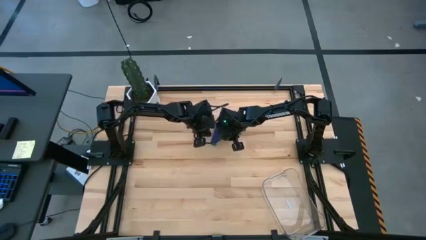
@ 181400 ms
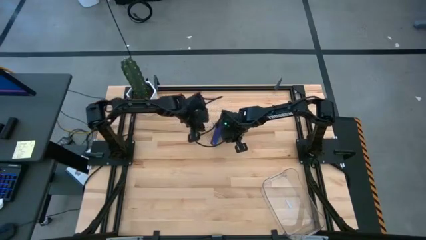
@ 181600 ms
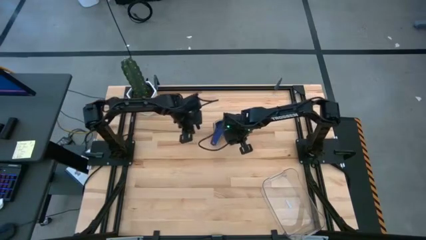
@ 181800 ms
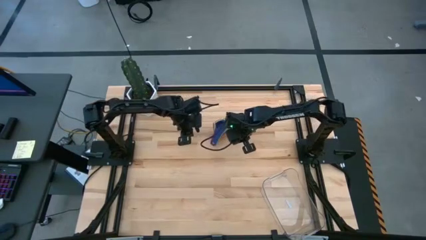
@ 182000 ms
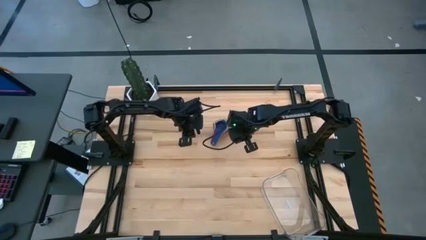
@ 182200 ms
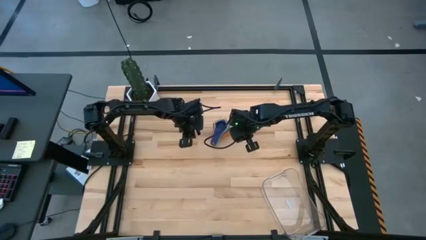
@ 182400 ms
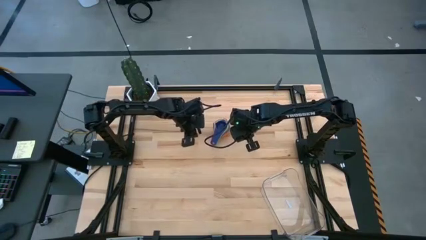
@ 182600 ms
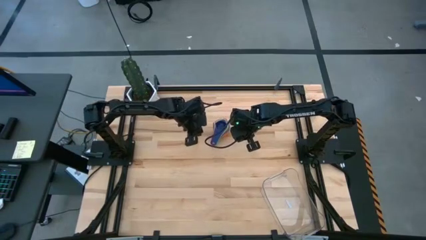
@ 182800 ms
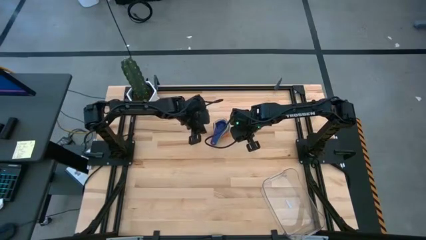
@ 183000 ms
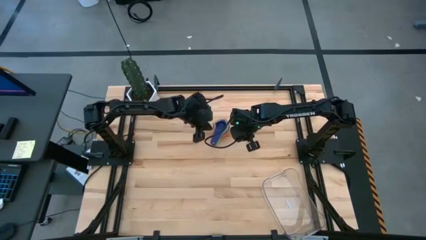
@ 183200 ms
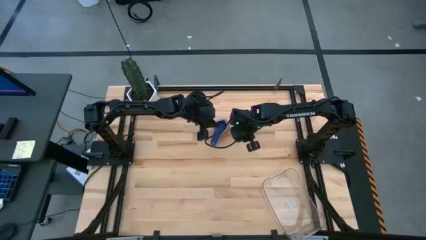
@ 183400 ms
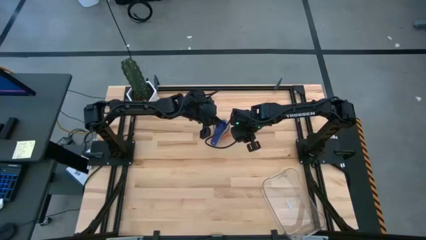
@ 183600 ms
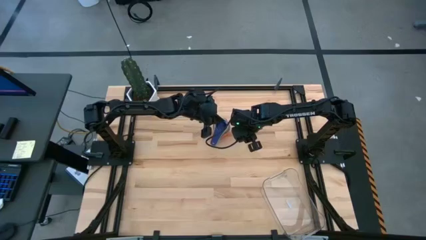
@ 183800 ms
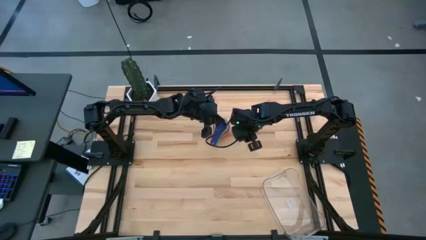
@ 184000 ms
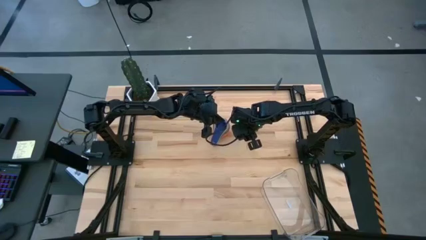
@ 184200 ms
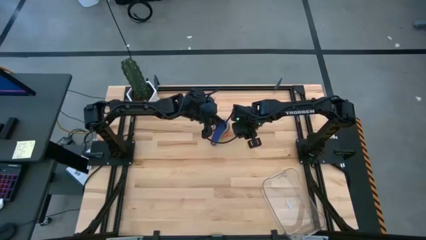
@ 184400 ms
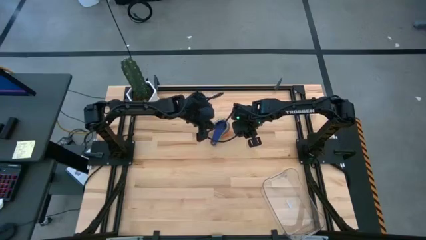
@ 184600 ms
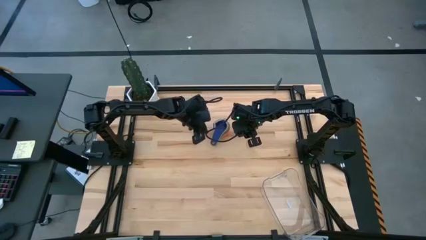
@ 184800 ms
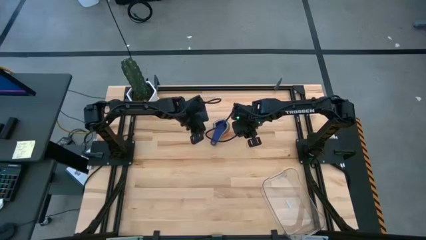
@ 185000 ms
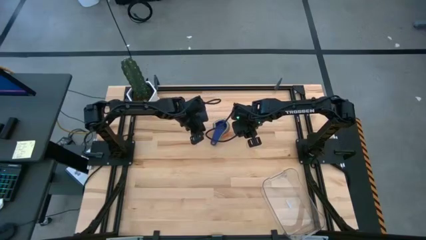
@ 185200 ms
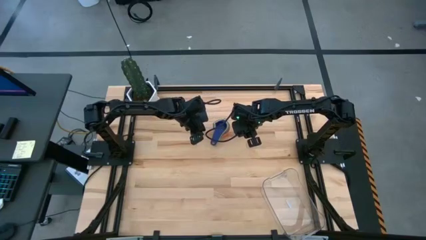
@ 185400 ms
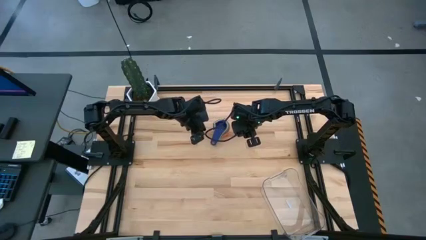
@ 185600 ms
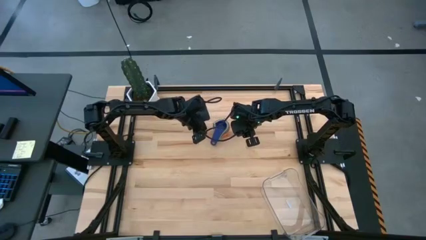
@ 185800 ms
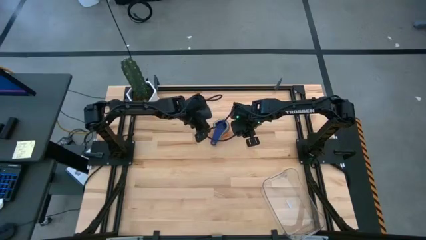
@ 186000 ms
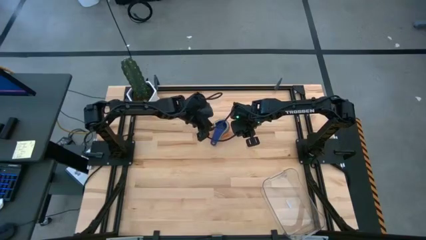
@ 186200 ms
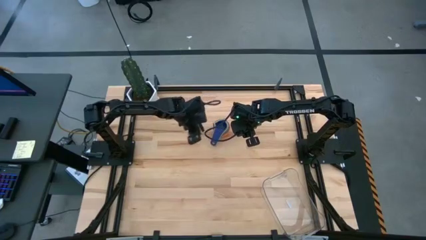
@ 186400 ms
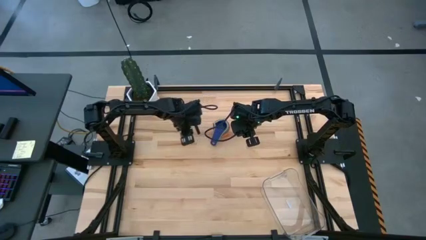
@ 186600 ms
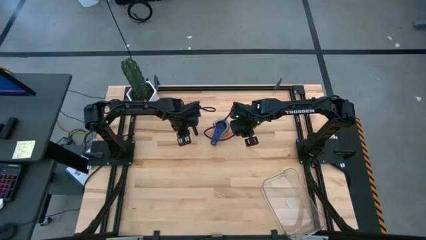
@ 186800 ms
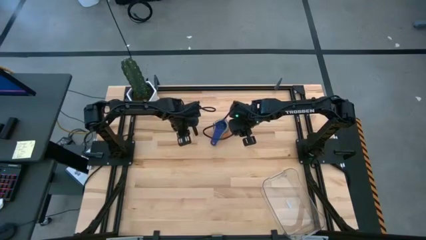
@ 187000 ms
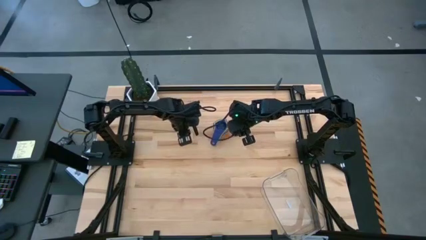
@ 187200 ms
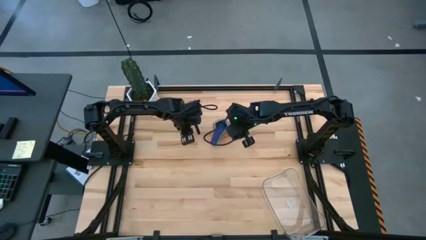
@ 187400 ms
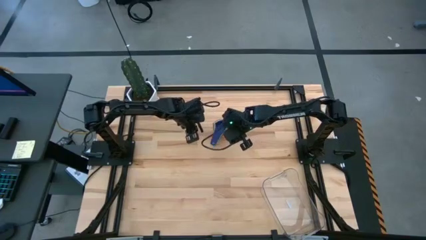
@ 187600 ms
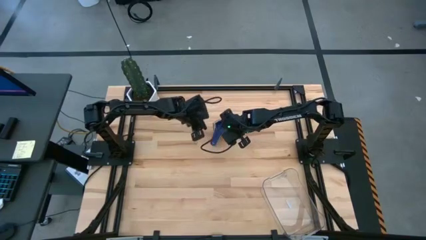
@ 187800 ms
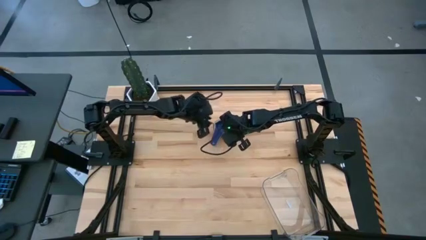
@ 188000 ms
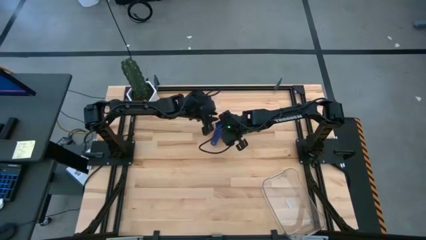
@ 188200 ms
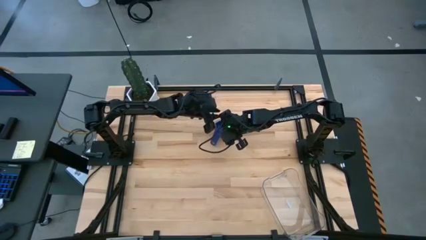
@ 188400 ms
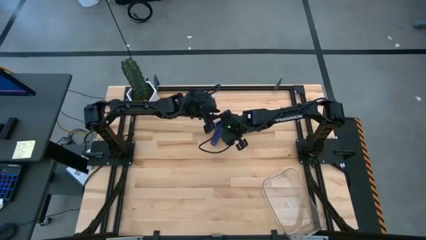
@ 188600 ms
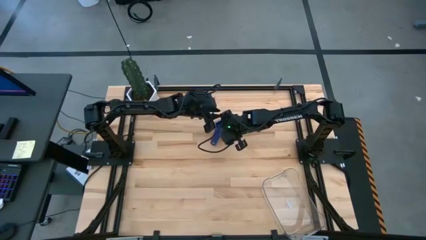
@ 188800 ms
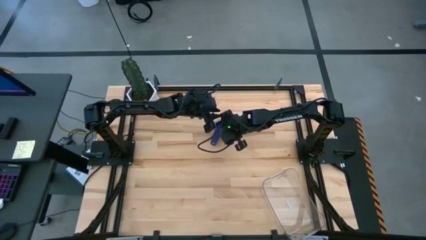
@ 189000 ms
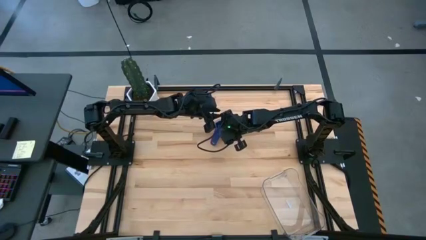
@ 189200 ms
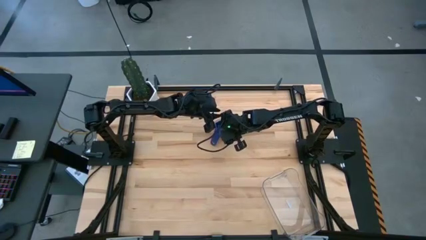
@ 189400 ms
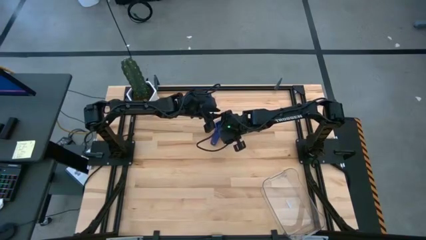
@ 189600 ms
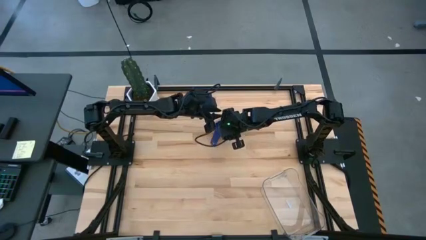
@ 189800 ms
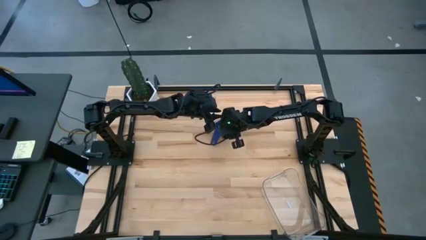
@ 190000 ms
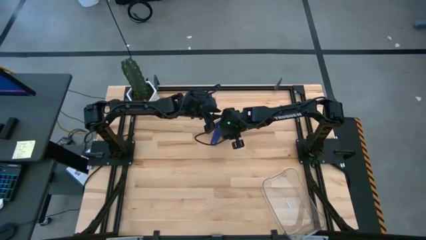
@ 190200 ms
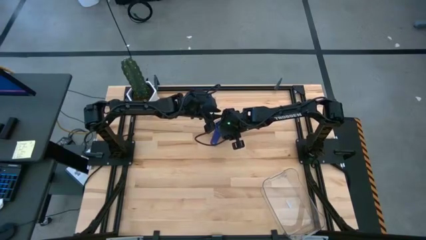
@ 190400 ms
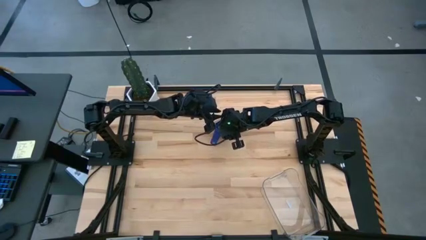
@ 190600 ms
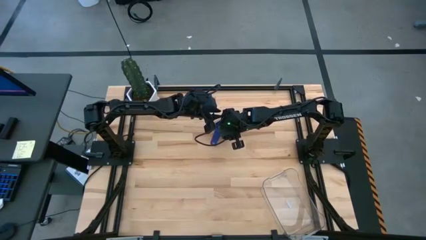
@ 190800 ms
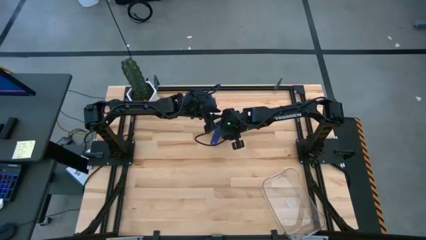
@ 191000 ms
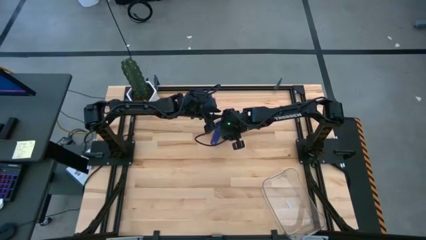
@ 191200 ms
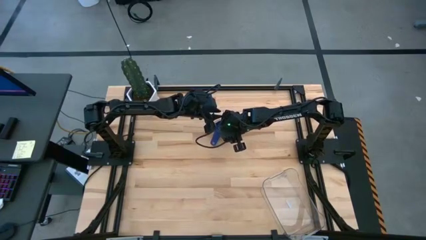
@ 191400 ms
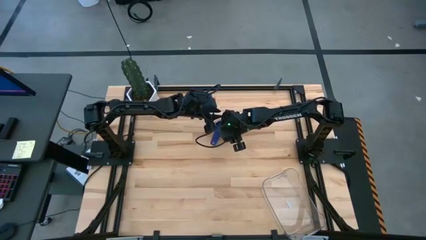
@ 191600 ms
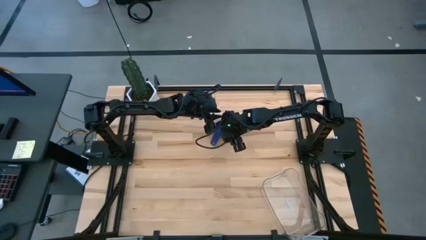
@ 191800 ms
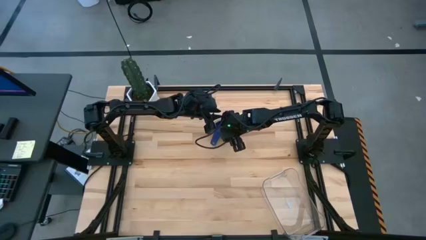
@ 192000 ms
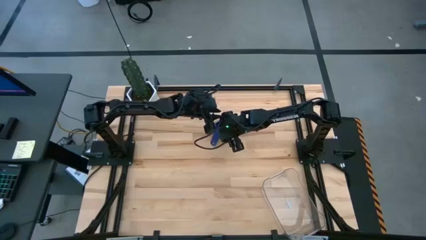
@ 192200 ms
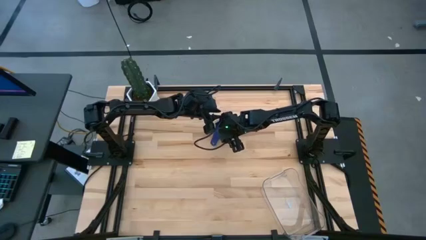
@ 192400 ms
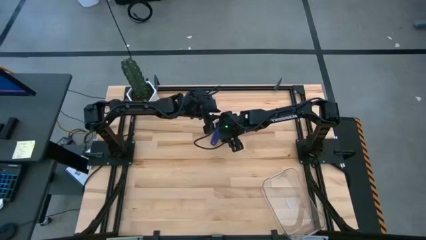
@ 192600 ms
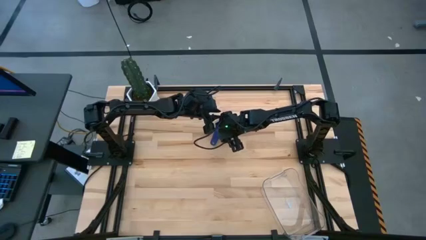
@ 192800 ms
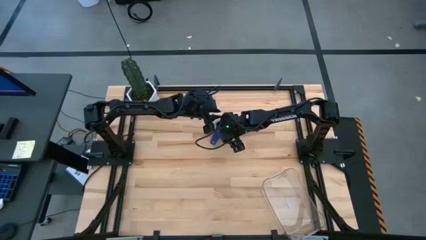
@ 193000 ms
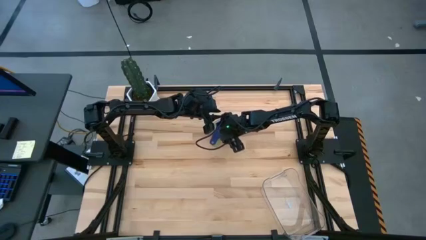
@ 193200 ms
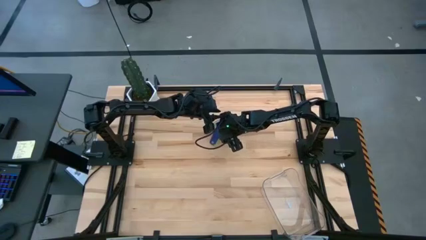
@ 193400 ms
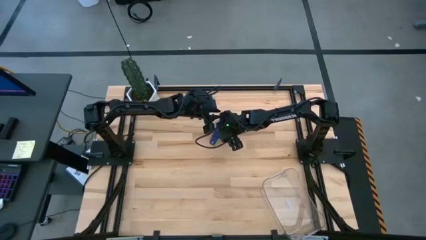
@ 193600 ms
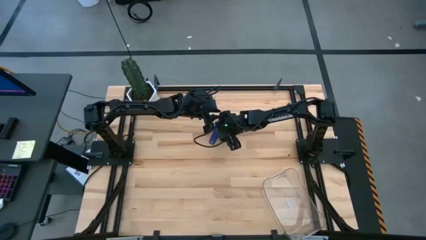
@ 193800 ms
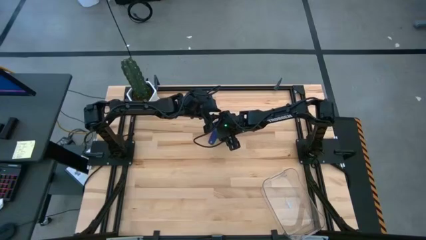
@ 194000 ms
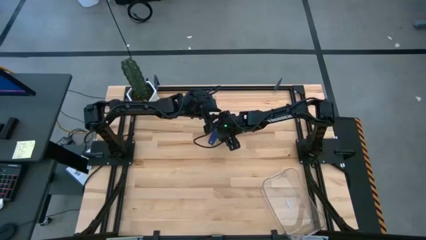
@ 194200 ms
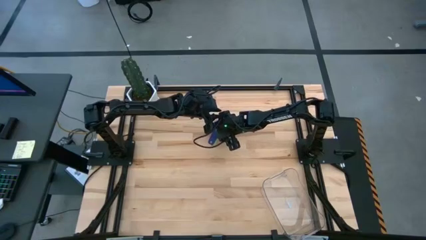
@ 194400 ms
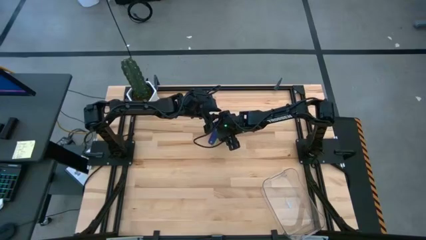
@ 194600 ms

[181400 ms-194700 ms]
Task: Nest measuring cups in basket
Put the stacked measuring cups into the transparent bin
